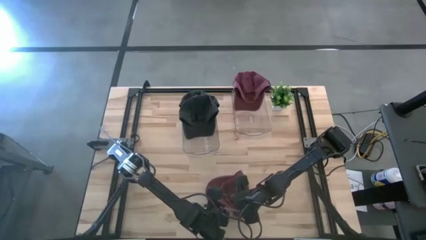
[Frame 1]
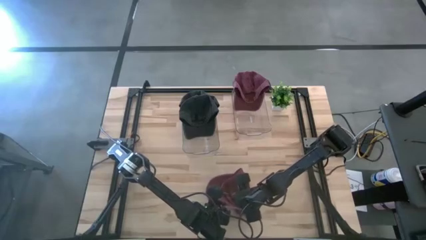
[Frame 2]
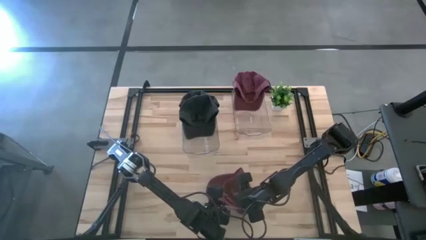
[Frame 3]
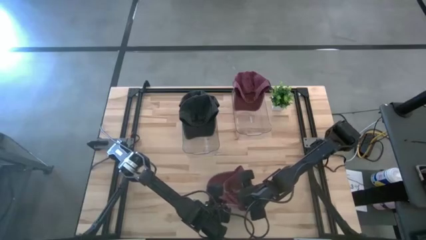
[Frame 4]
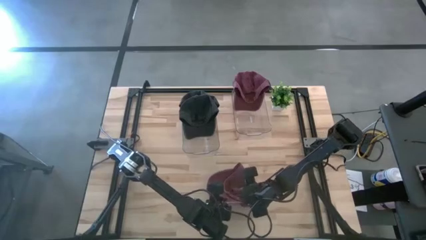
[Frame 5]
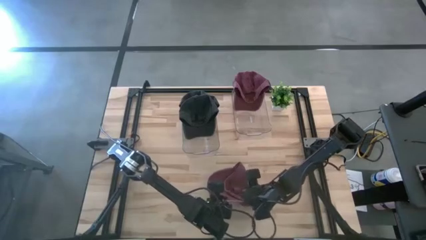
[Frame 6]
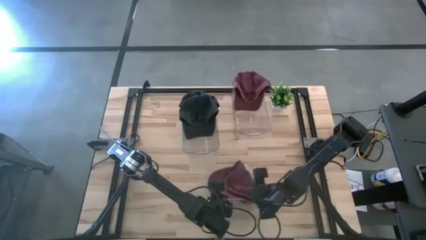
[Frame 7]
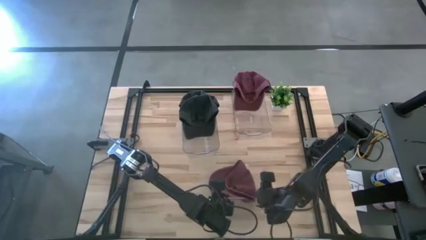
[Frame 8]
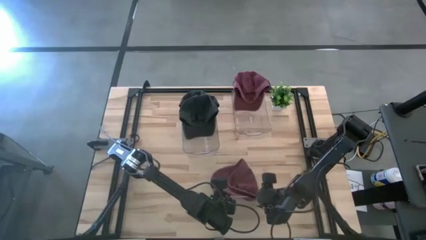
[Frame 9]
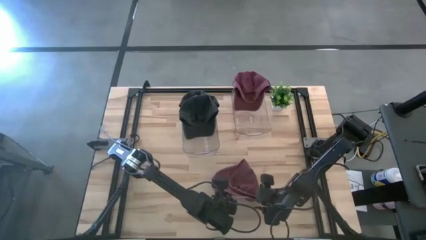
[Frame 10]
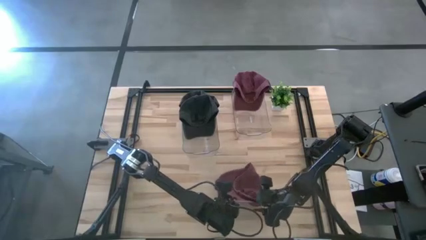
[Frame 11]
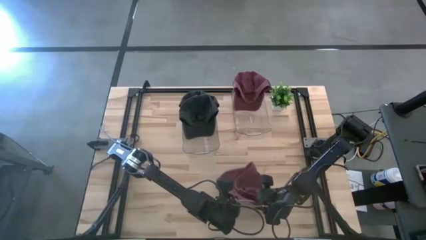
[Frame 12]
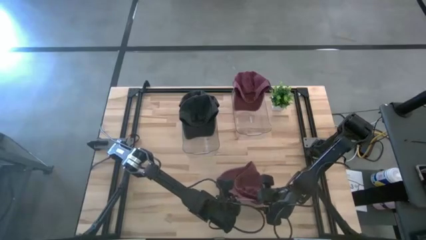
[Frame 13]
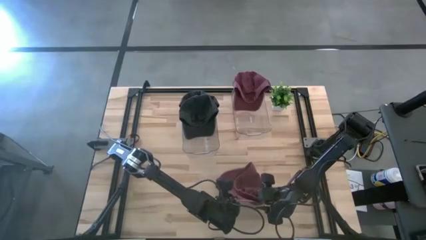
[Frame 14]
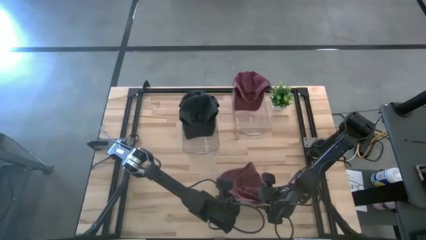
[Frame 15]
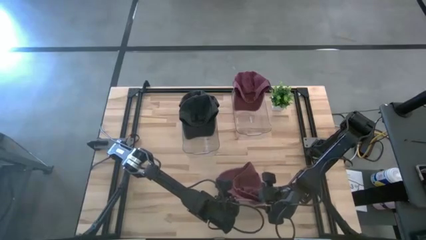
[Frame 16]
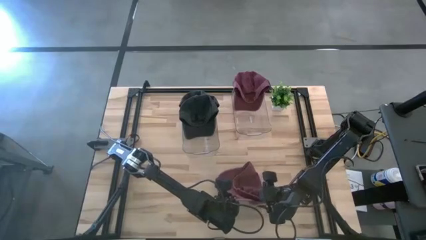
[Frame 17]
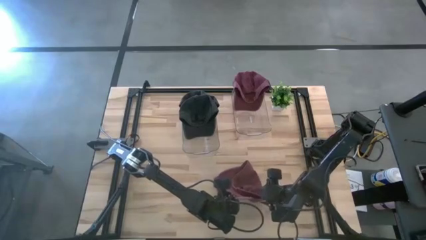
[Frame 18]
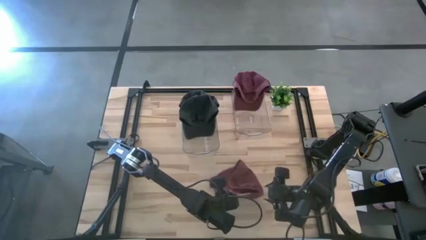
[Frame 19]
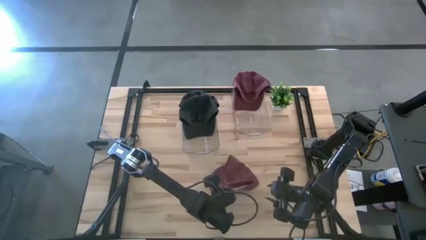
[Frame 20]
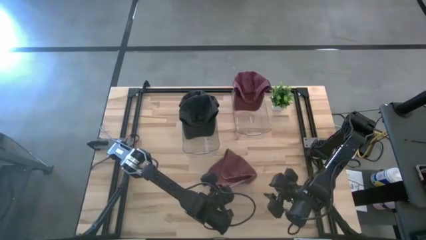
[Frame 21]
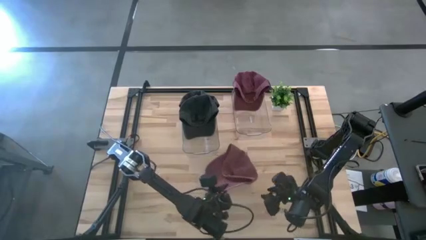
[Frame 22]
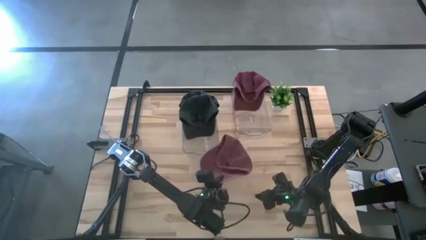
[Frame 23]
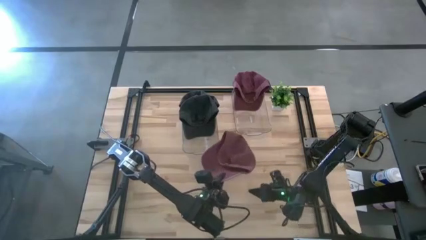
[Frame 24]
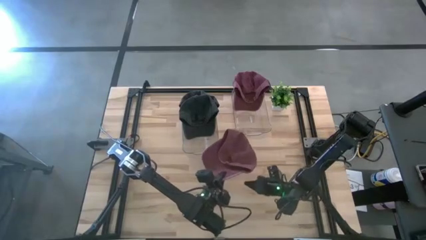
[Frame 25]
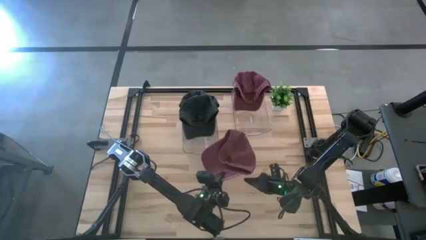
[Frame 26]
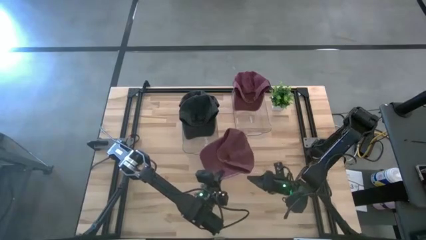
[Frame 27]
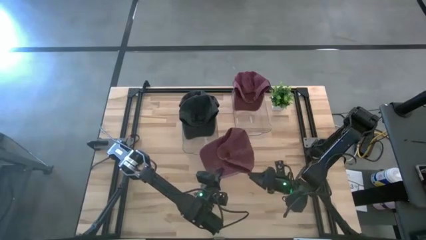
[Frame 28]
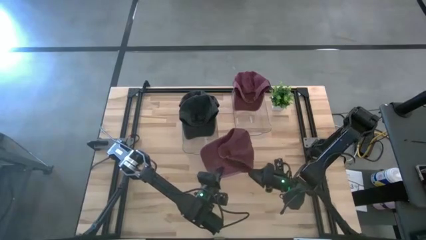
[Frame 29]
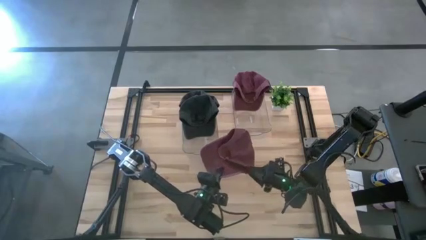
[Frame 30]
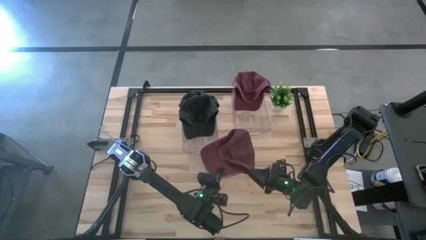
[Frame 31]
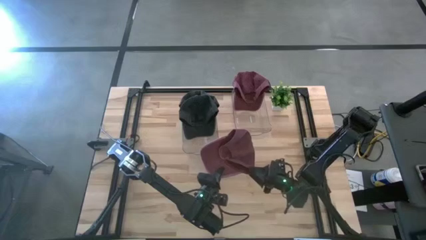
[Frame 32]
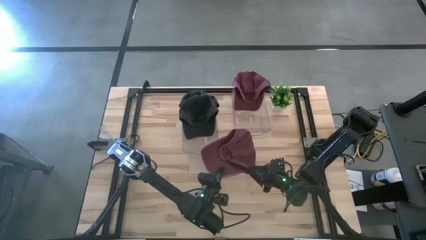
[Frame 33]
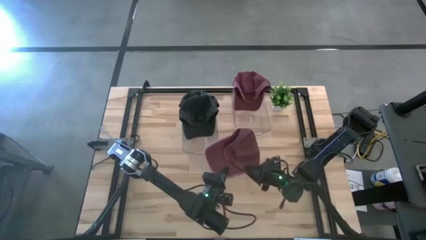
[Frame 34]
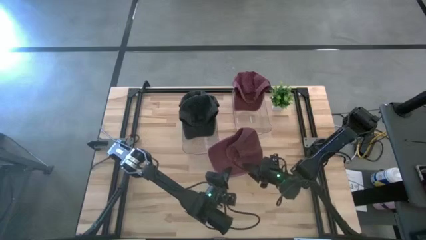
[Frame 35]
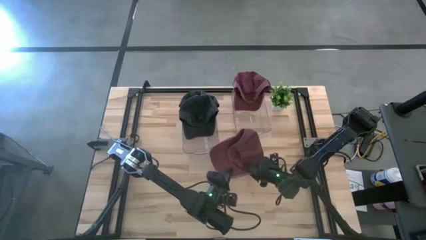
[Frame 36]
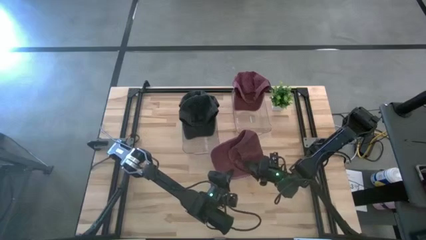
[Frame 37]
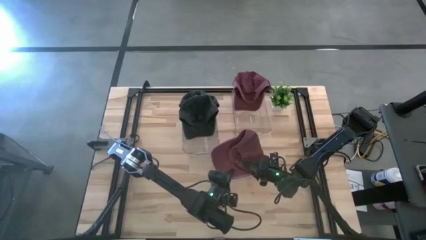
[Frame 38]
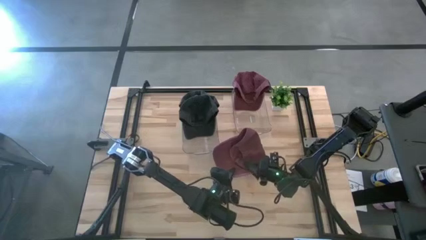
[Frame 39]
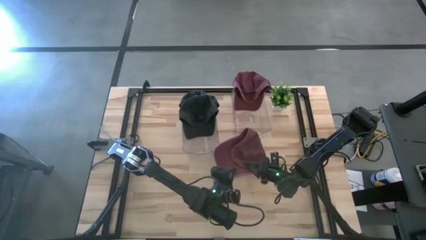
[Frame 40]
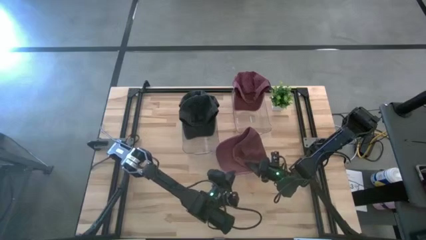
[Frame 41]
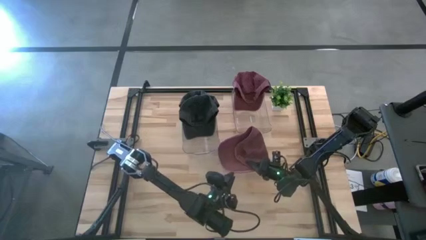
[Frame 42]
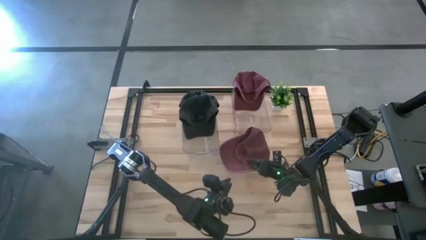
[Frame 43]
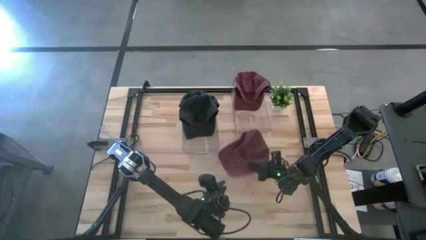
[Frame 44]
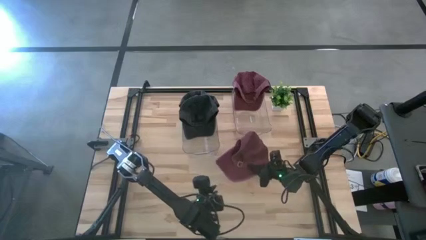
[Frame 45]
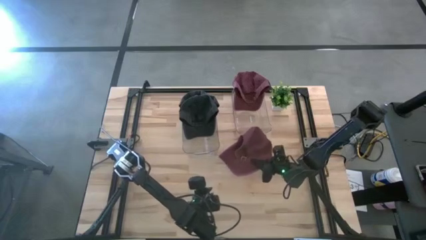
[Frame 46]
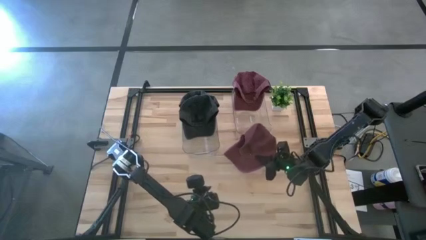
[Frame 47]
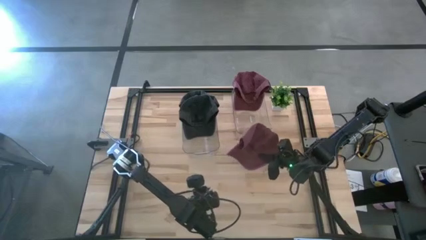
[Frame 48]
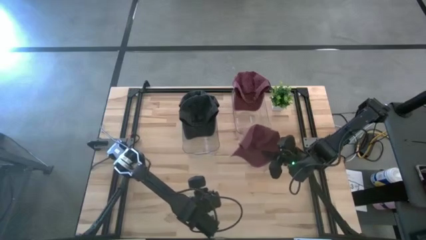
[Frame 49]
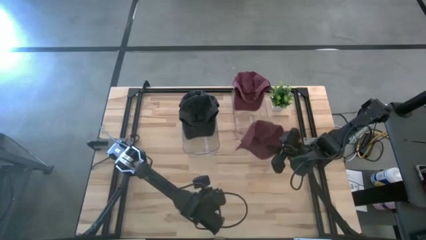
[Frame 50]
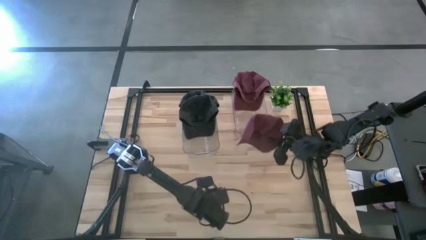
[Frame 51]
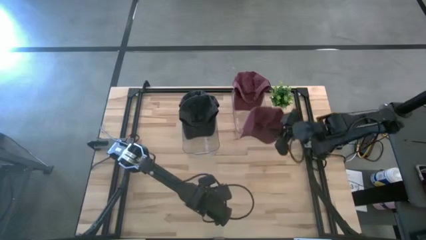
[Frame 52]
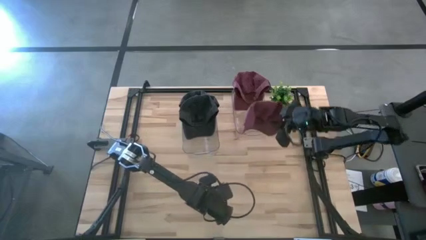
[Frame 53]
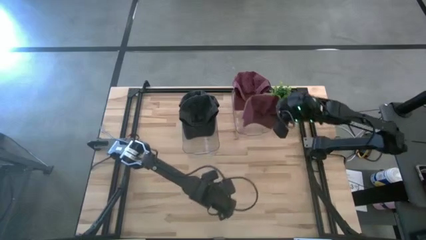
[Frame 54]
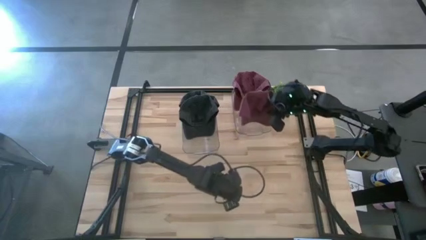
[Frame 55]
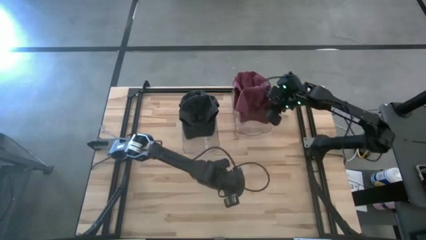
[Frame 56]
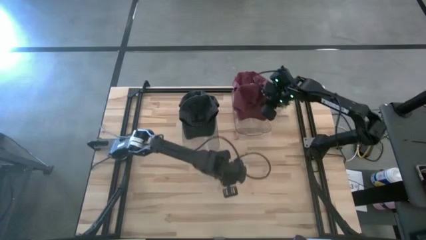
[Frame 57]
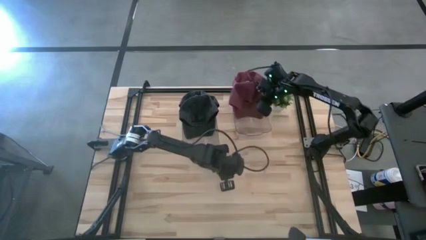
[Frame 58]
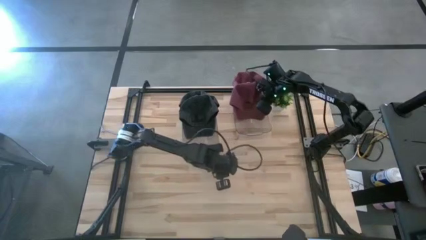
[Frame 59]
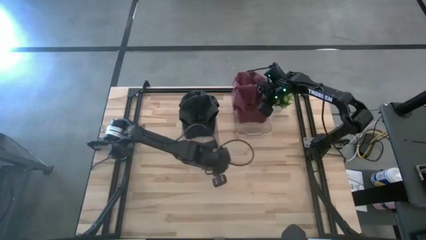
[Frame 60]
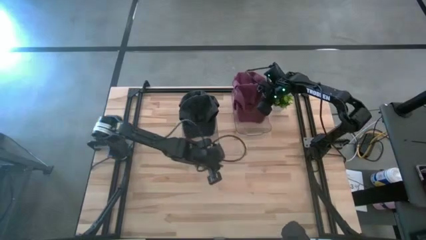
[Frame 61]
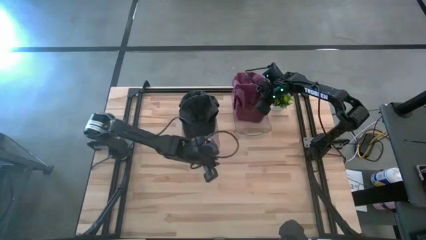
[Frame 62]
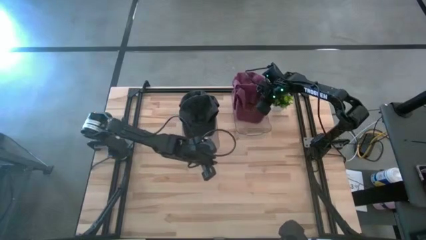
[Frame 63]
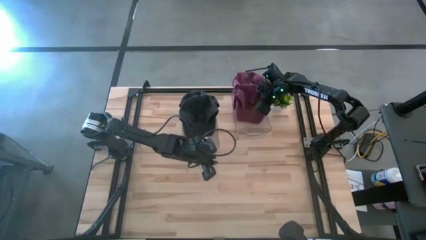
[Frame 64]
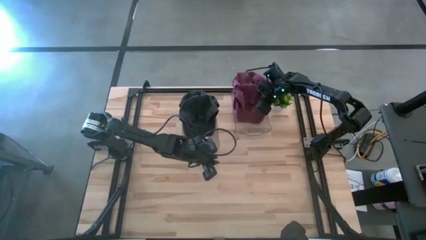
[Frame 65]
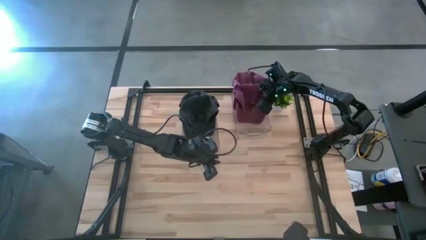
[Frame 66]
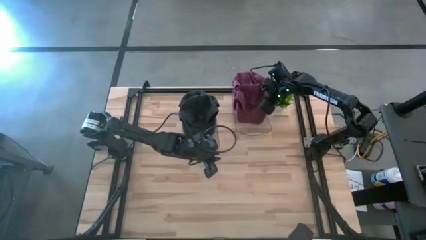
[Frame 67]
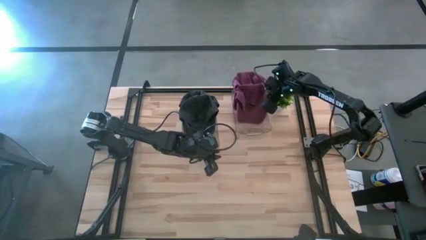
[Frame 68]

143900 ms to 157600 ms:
Task: Pick & Place hat
Put the red cap into the right transparent bin

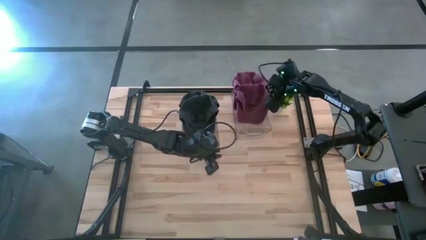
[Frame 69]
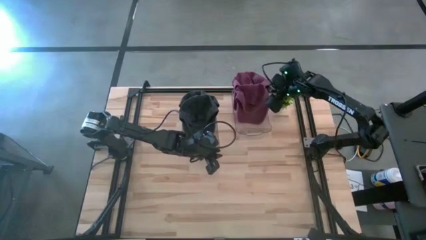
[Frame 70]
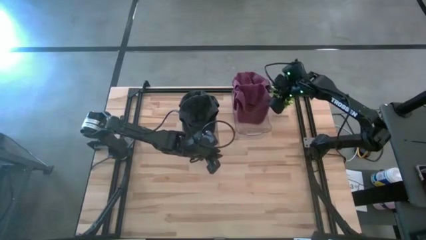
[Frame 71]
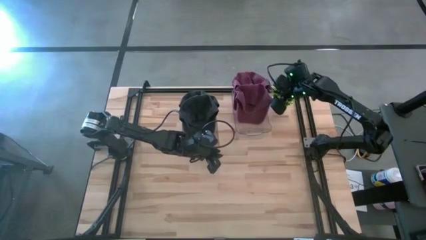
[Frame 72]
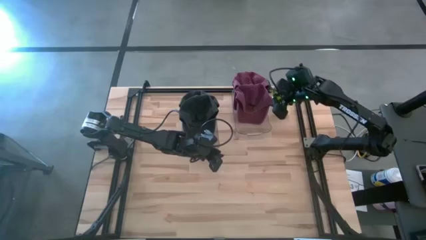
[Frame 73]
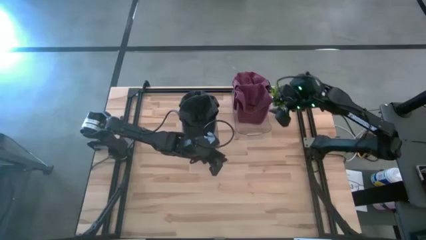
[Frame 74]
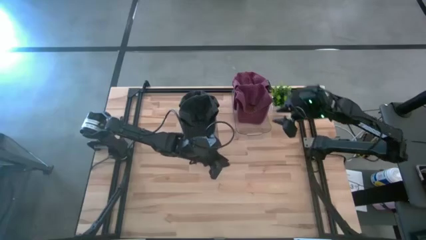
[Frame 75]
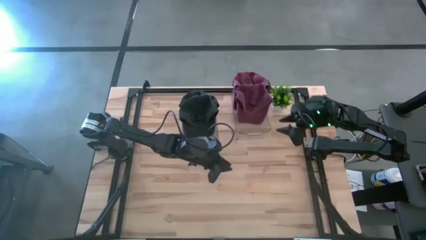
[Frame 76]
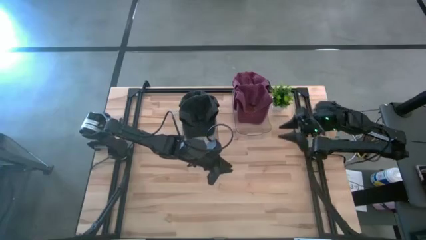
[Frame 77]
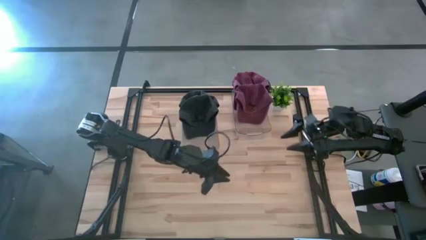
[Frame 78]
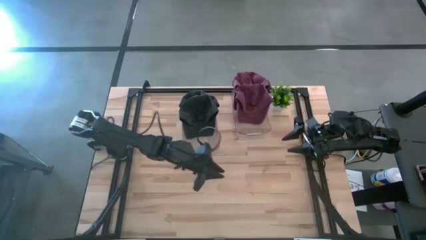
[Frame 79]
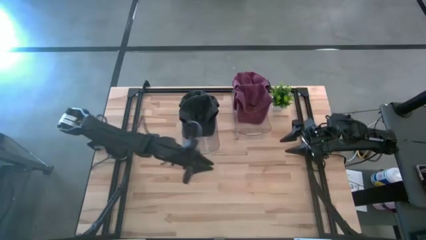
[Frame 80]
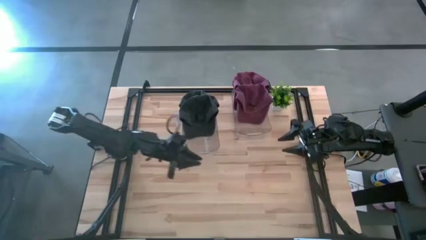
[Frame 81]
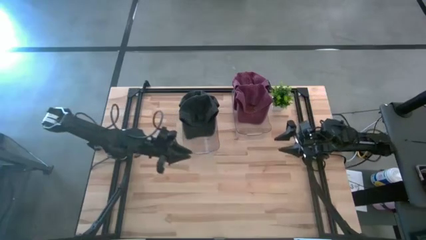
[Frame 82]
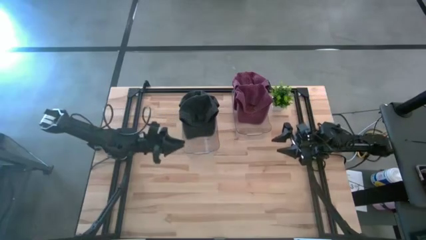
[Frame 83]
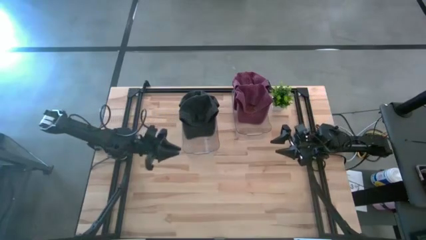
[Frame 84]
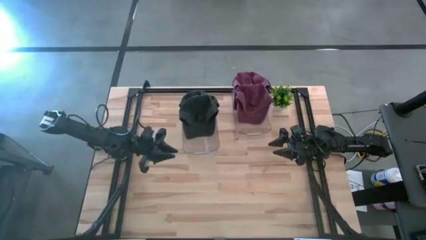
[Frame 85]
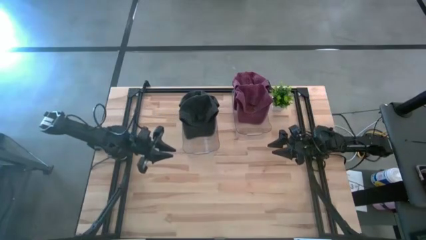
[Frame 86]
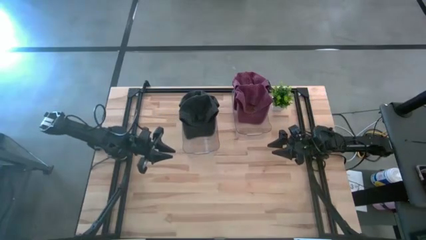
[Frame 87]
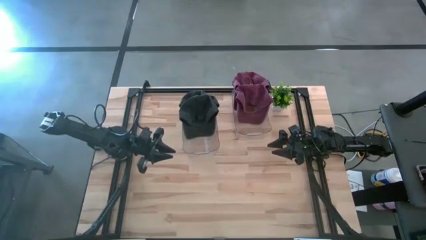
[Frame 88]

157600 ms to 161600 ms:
Return to Home Position
